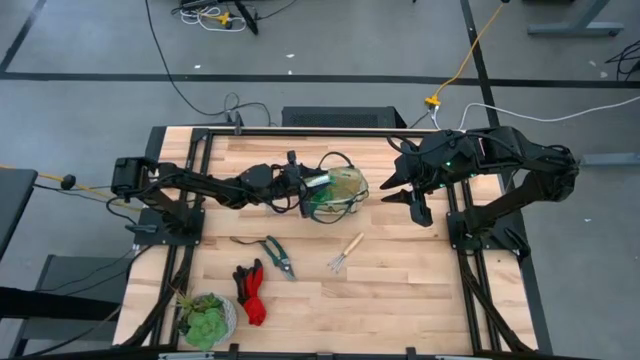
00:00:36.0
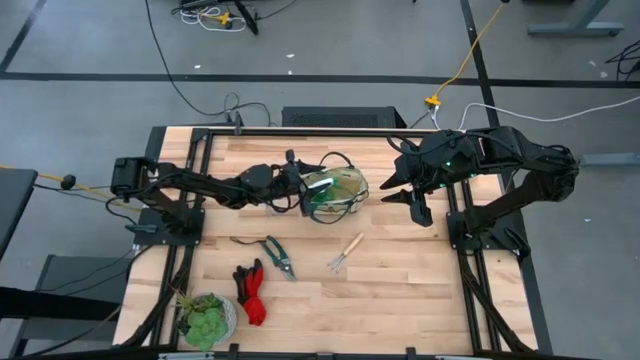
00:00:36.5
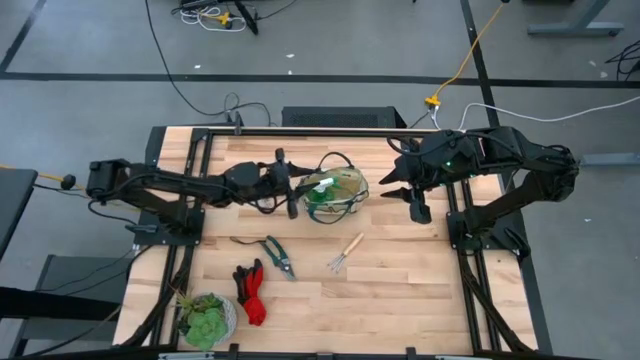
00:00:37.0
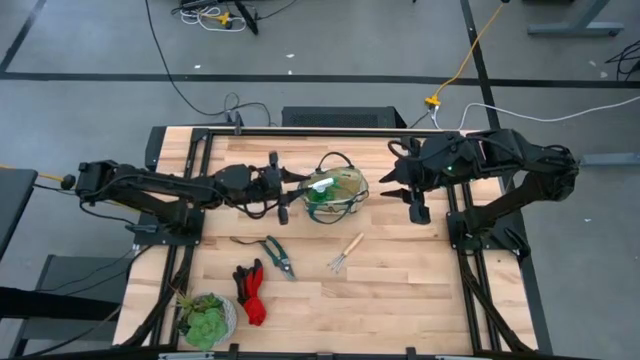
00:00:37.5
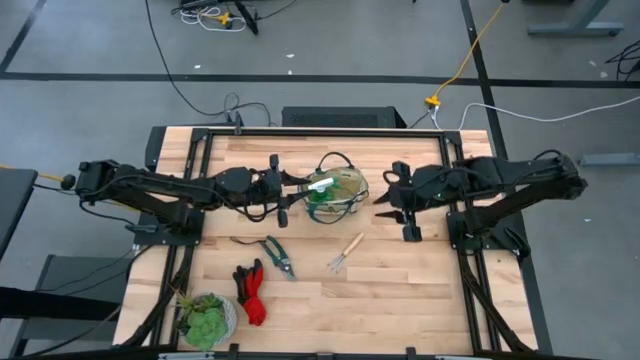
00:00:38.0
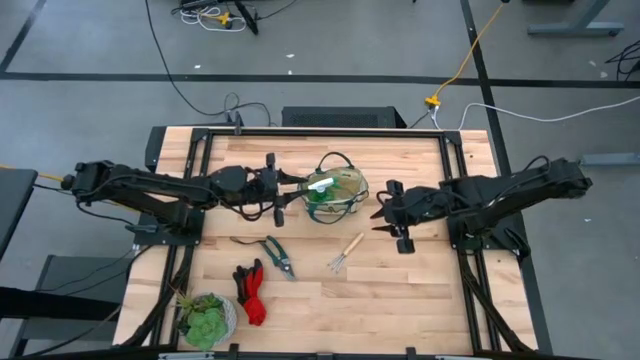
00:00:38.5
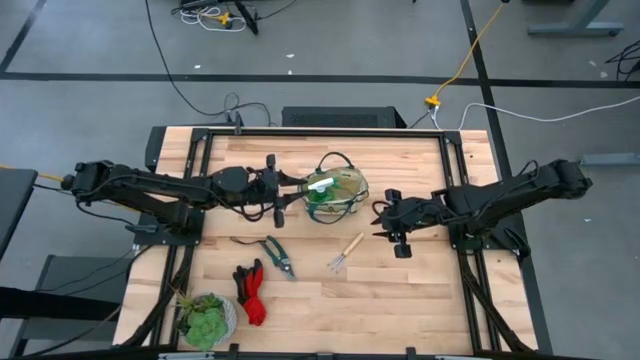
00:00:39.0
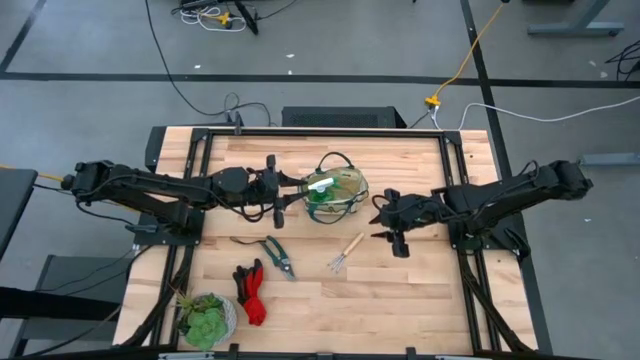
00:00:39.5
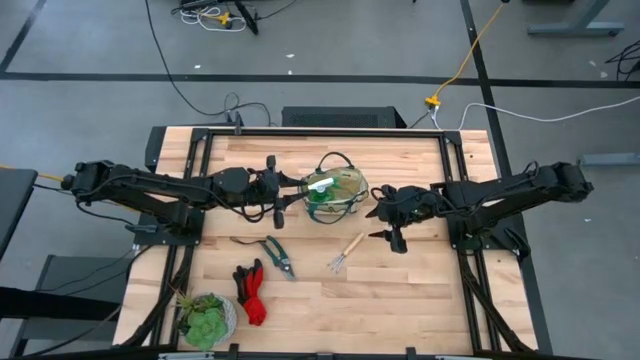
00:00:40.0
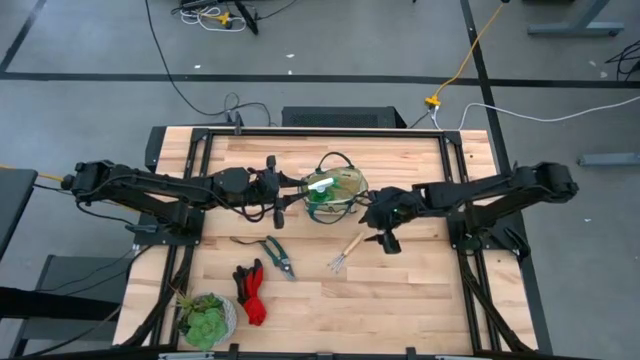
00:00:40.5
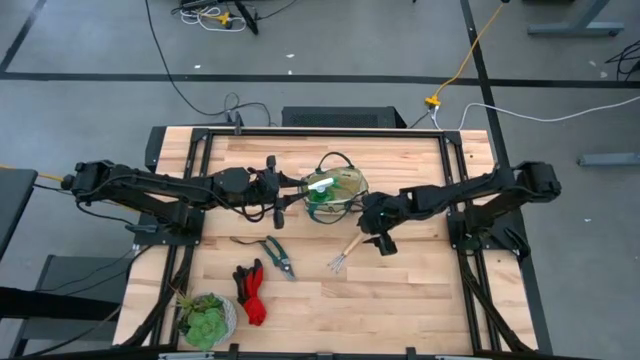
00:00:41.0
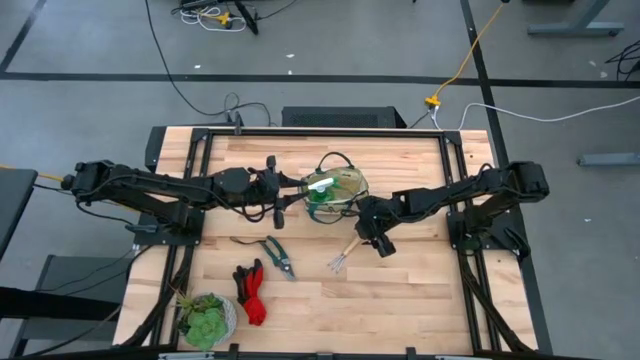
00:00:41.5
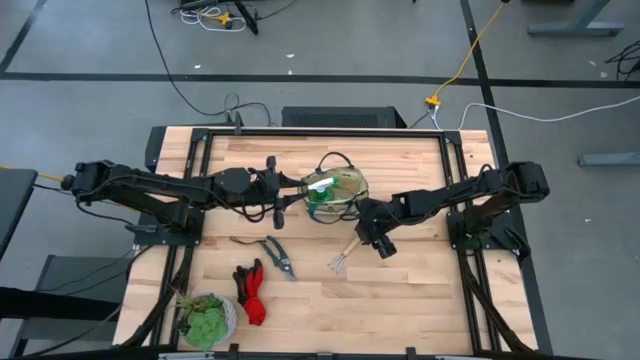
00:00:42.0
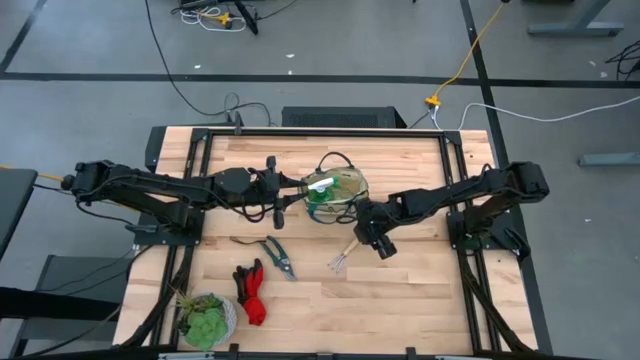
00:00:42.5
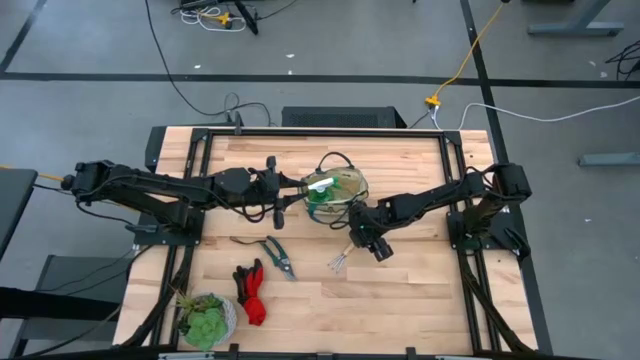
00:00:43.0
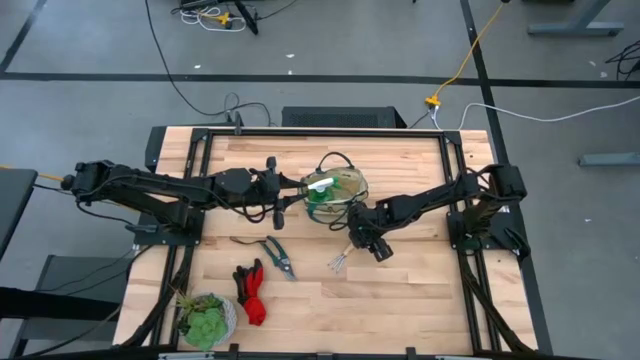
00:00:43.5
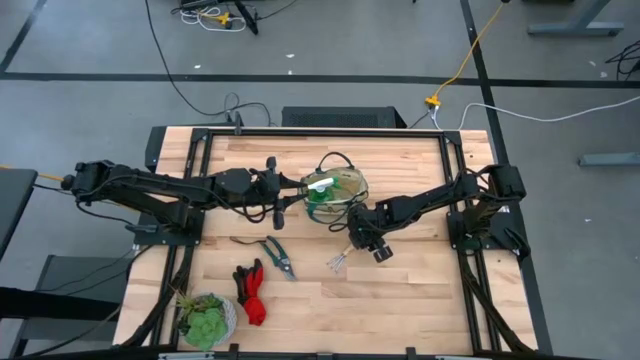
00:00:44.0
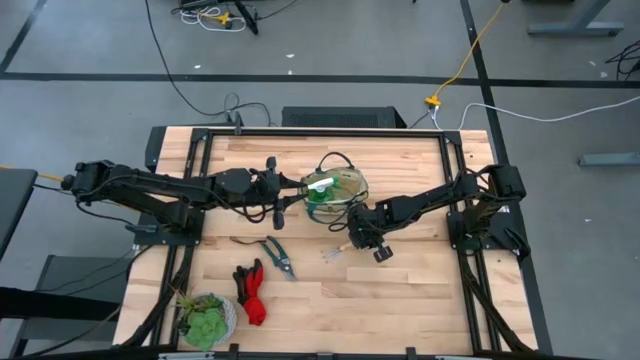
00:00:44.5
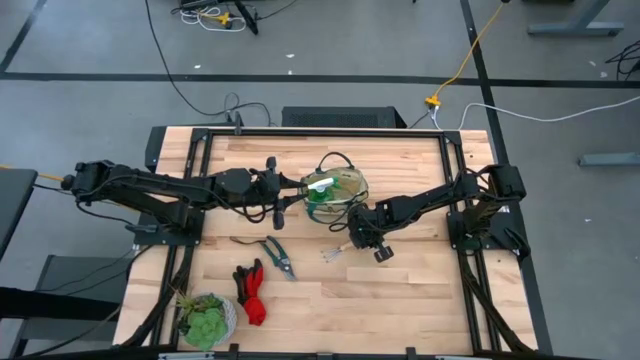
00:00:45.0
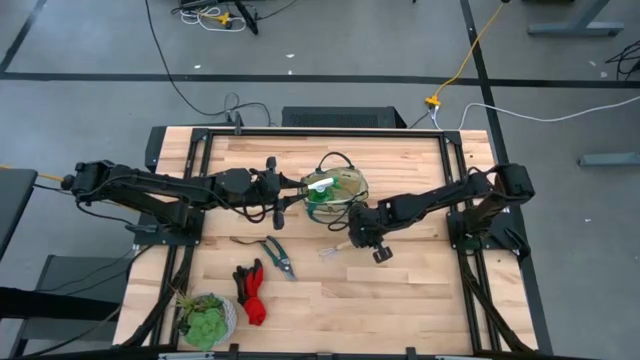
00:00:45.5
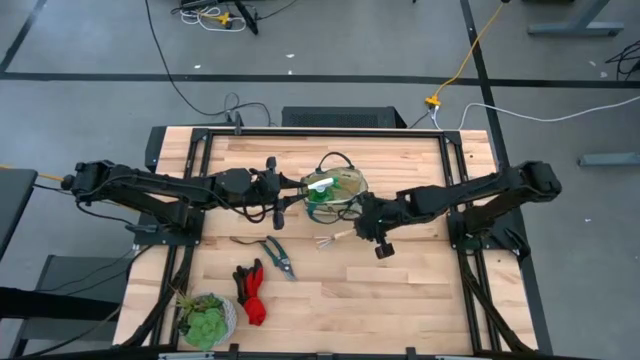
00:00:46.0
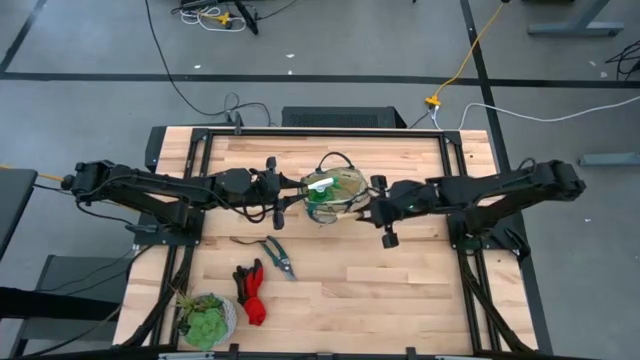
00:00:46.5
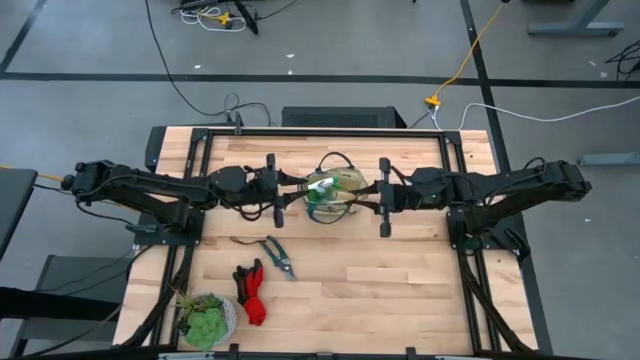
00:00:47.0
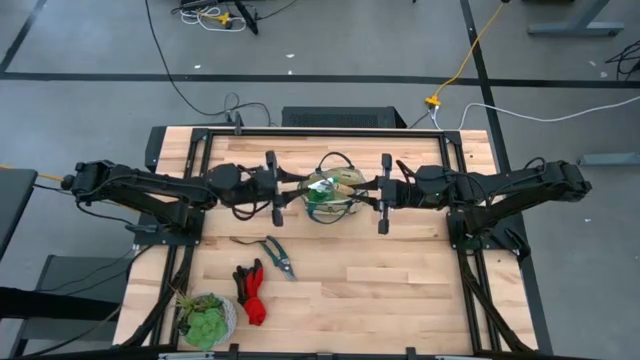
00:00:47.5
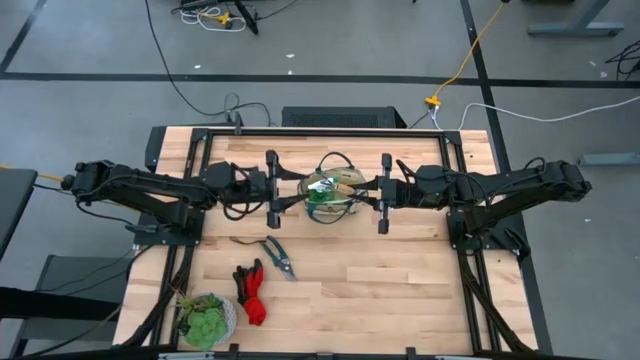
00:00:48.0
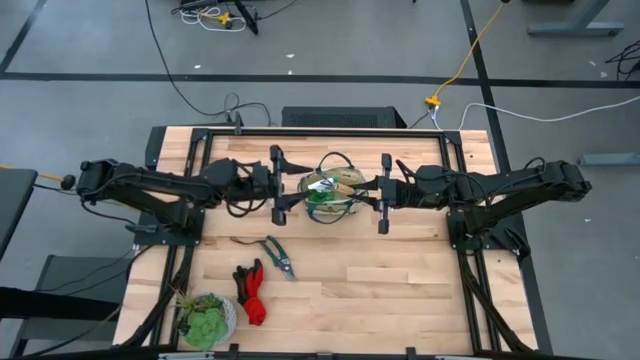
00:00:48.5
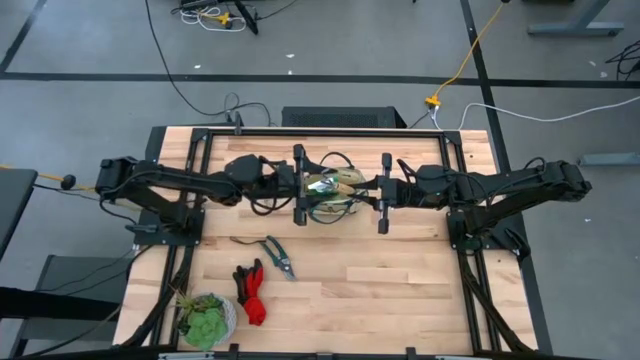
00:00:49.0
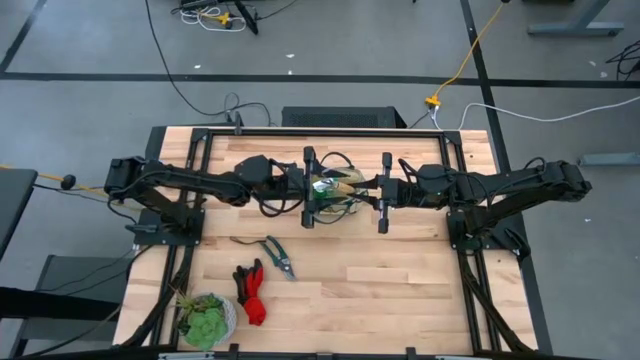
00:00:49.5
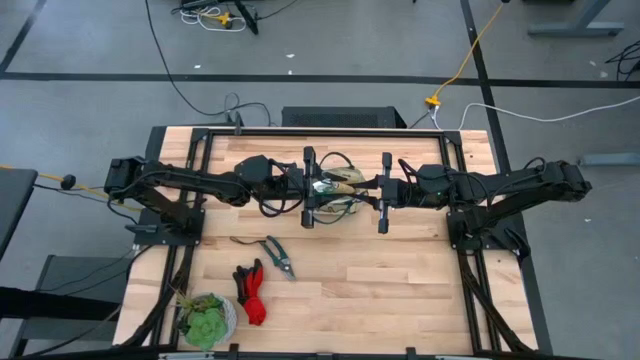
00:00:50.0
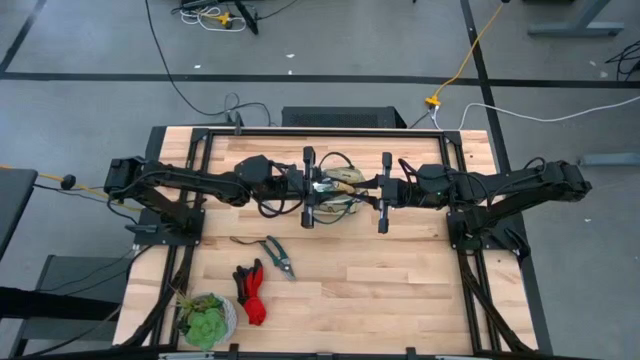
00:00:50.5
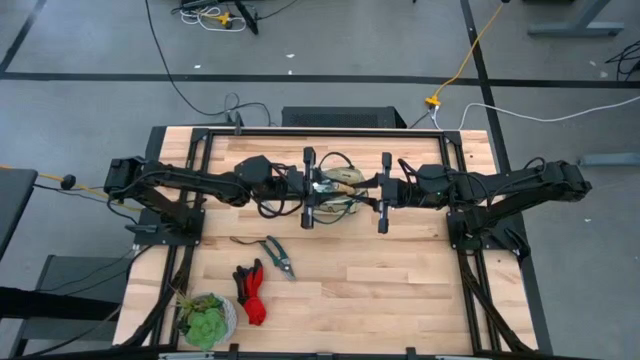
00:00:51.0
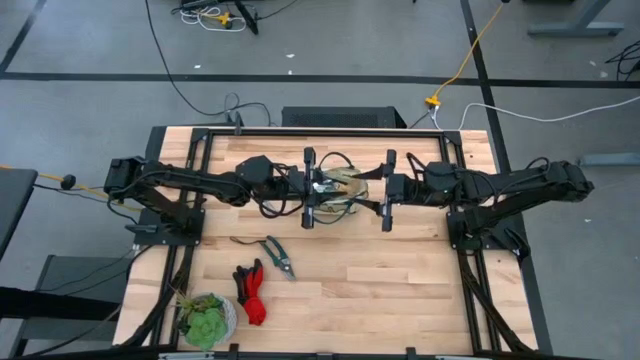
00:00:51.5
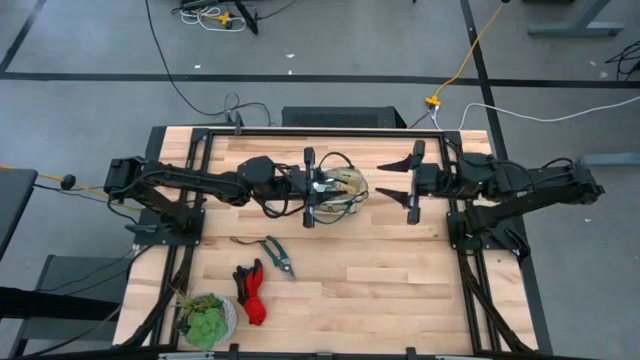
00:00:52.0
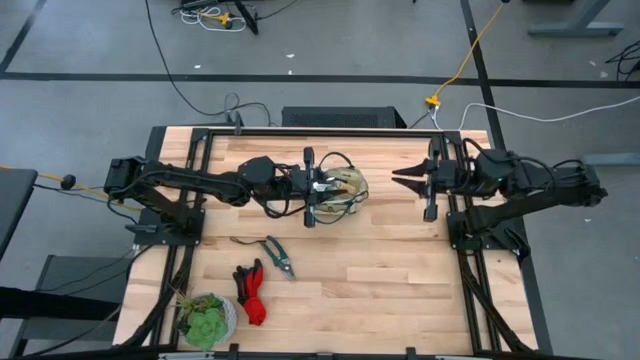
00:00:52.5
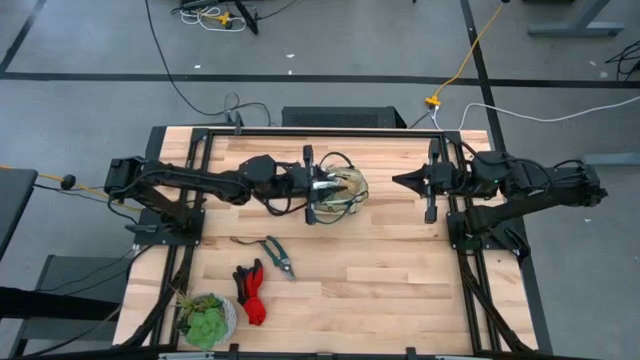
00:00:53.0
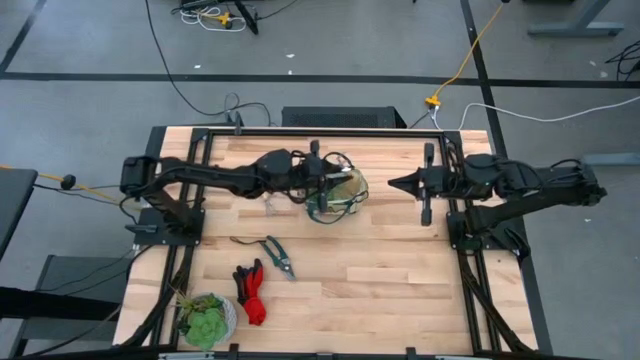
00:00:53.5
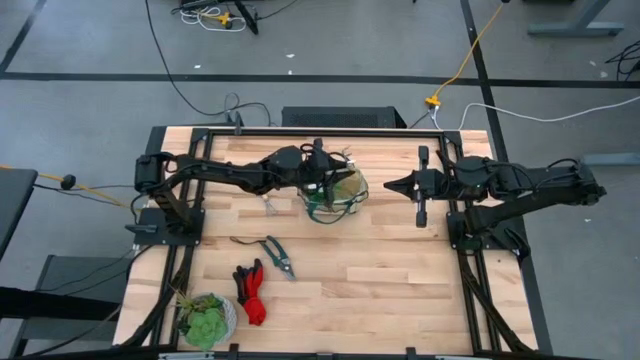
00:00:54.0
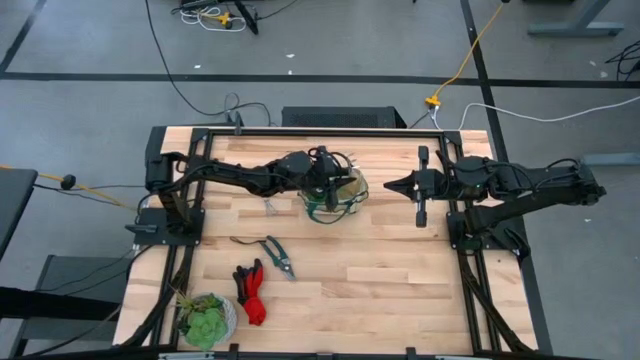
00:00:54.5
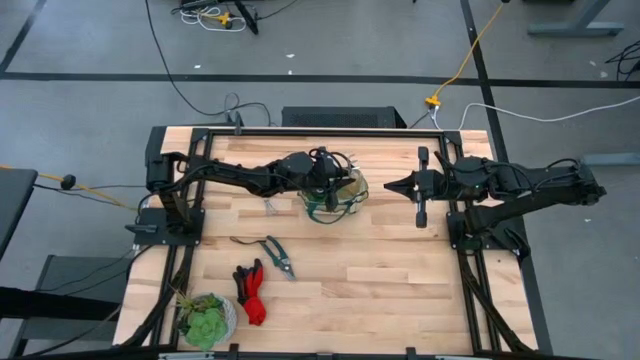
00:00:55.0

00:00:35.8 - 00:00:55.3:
Task: Pick & Place Garden tools in Gardening bag
Put the bottom brown hand rake into the gardening bag

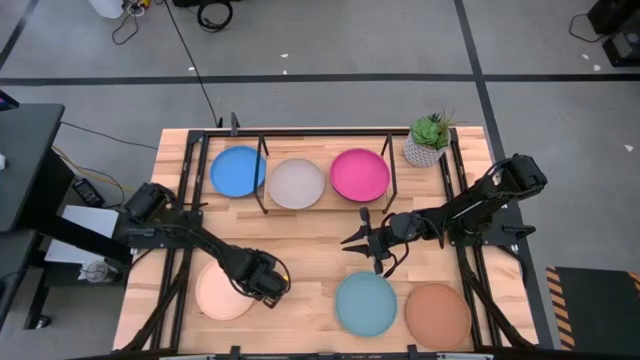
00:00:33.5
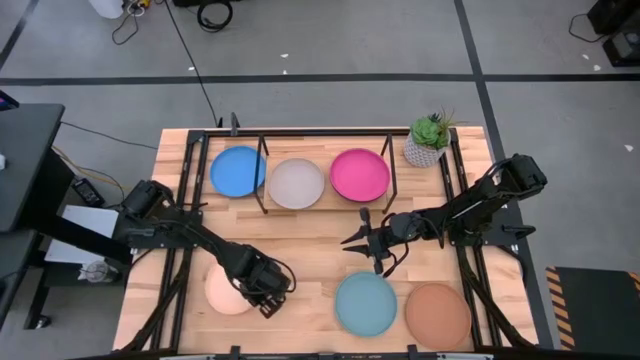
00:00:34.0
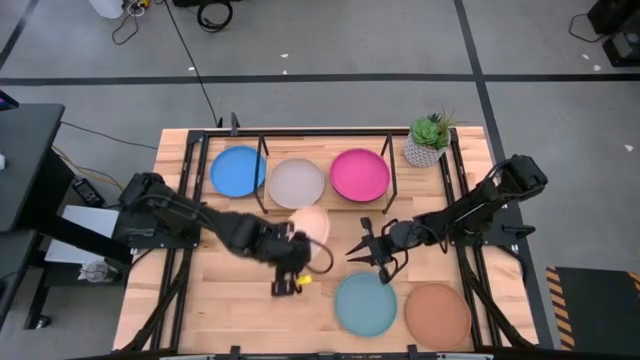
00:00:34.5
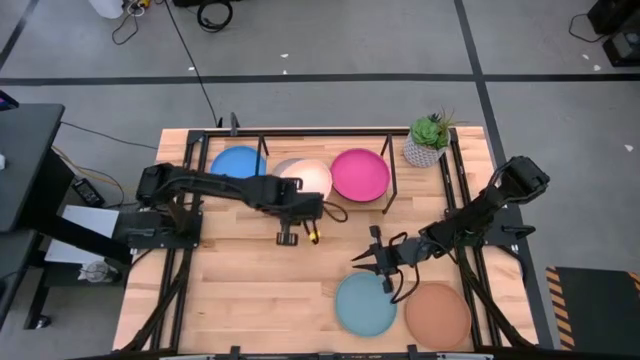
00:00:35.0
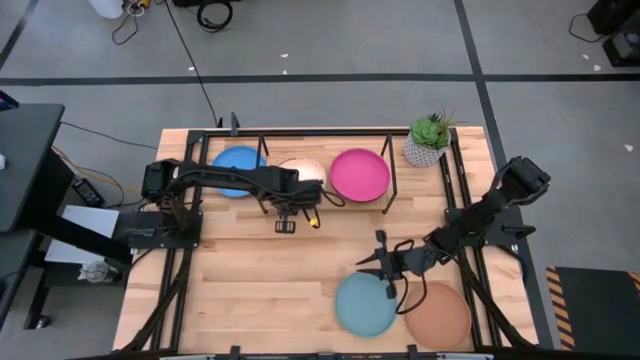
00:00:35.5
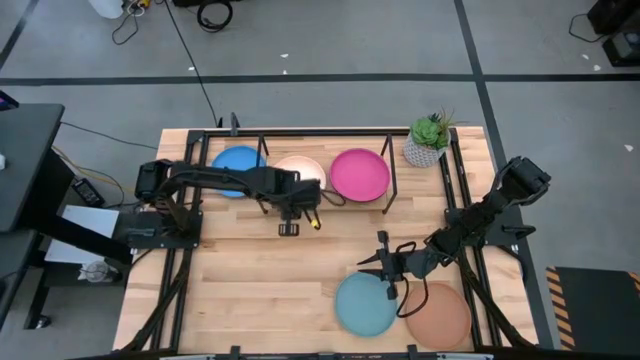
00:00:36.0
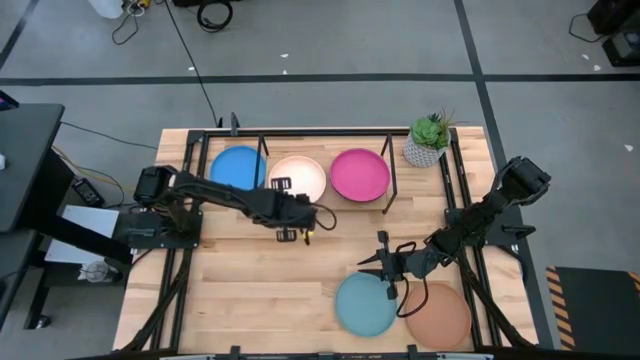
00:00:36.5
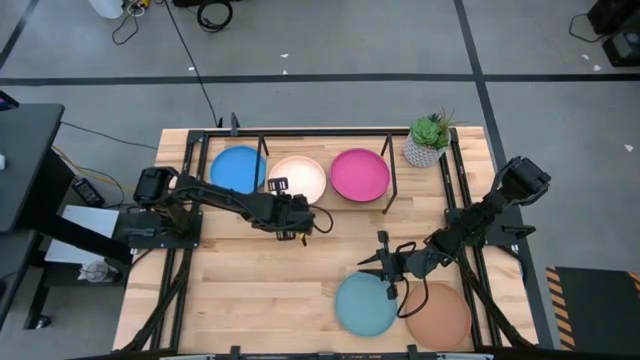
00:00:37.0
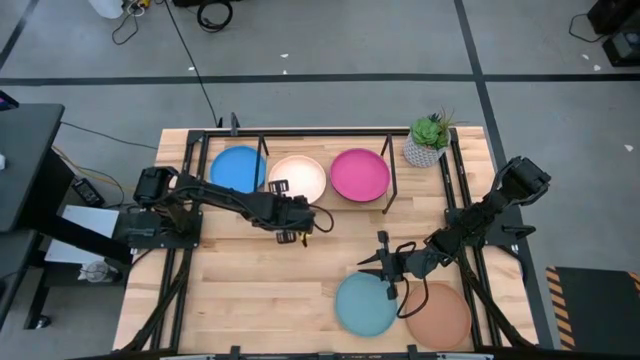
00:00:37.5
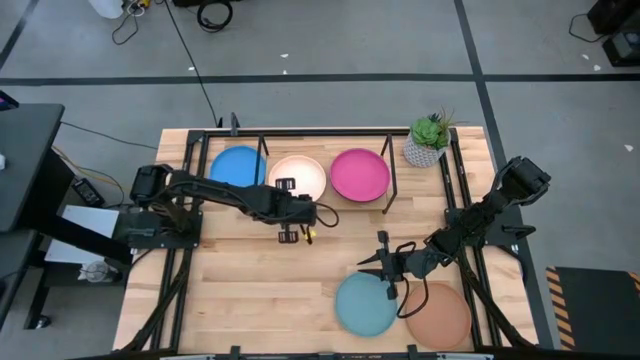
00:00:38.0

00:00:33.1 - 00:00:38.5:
Task: Place and stack plates onto a shelf
Stack the light orange plate on top of the gray plate on the shelf
